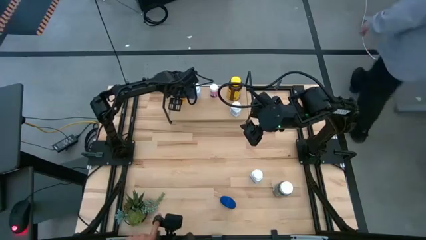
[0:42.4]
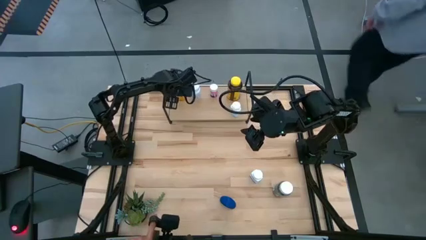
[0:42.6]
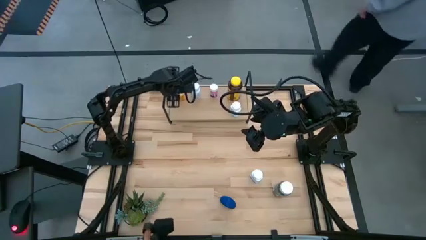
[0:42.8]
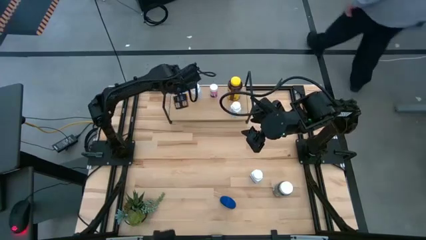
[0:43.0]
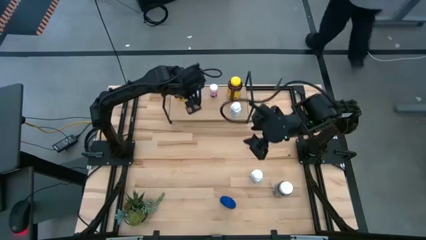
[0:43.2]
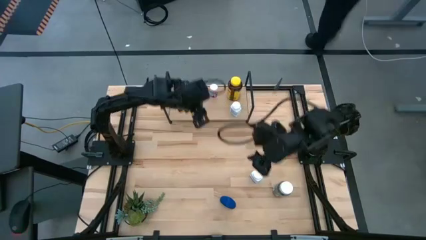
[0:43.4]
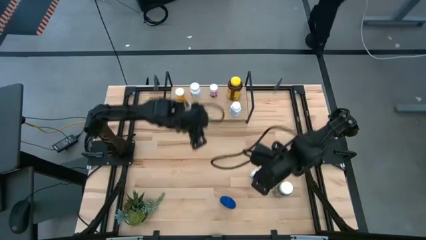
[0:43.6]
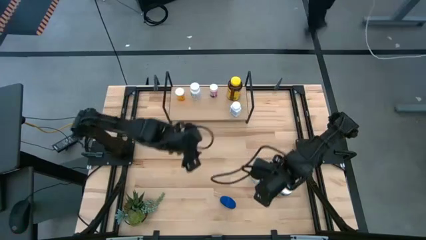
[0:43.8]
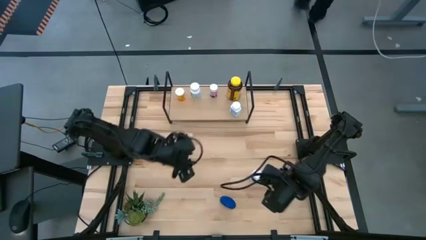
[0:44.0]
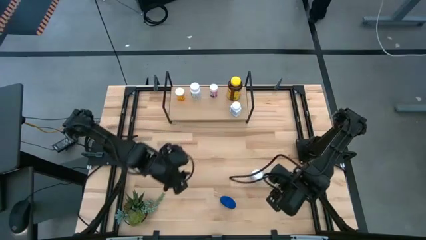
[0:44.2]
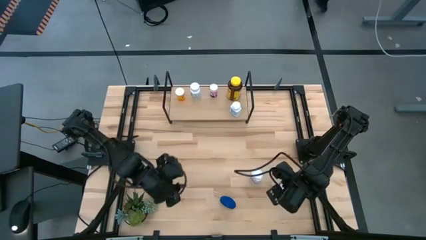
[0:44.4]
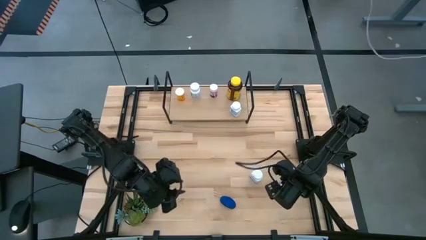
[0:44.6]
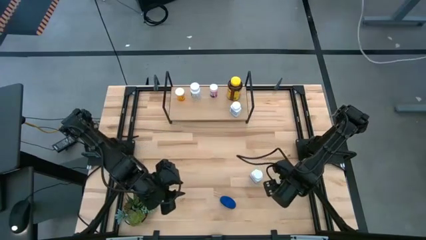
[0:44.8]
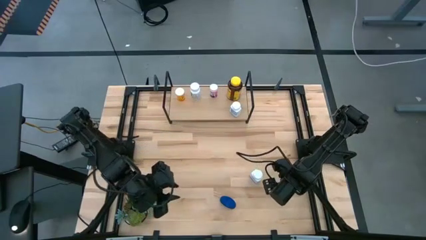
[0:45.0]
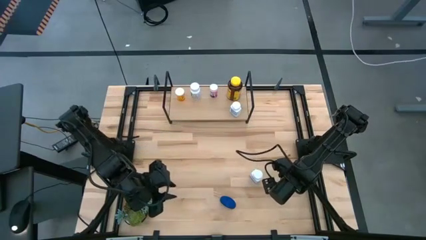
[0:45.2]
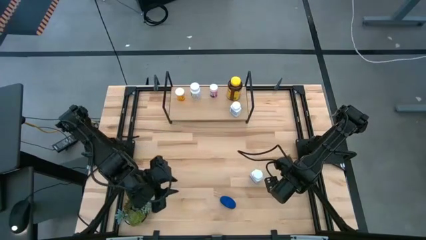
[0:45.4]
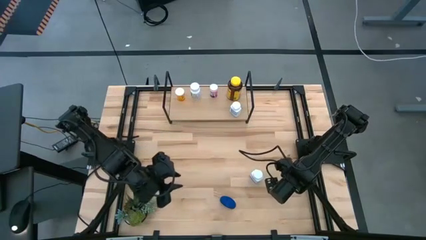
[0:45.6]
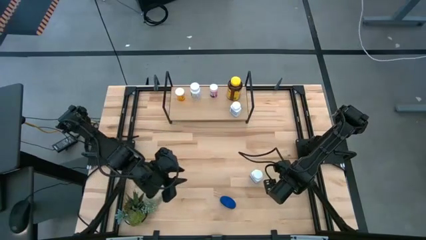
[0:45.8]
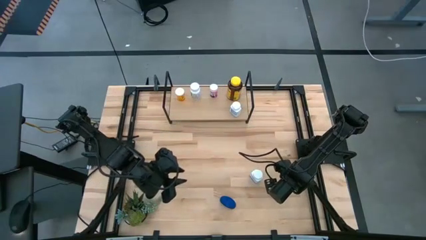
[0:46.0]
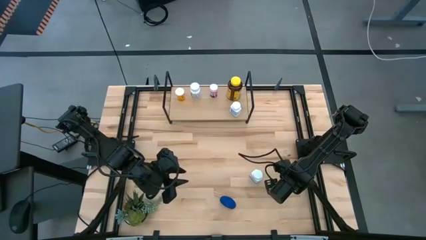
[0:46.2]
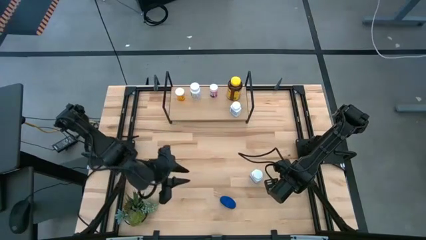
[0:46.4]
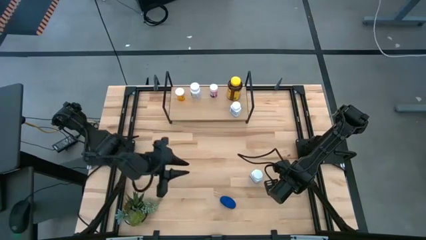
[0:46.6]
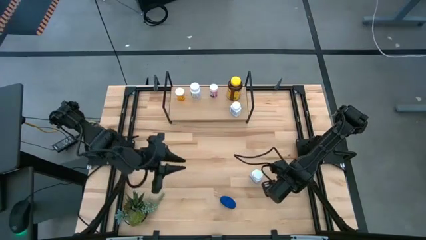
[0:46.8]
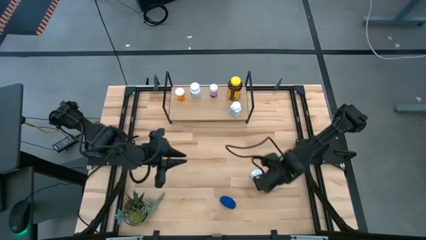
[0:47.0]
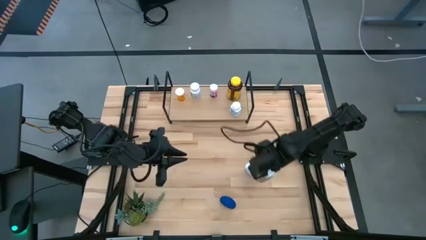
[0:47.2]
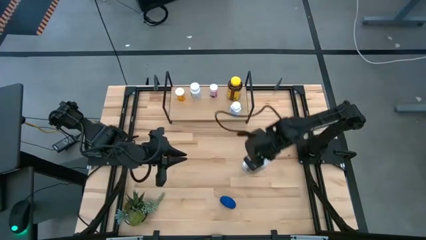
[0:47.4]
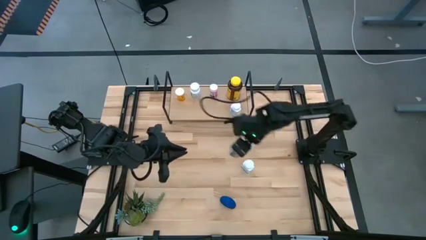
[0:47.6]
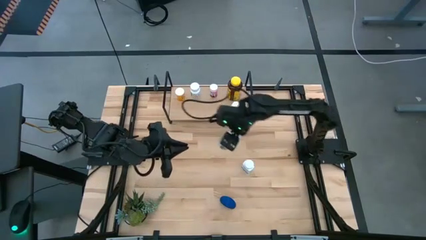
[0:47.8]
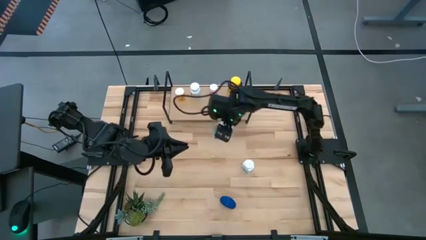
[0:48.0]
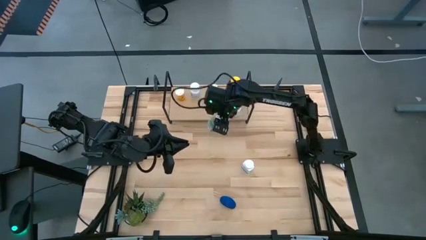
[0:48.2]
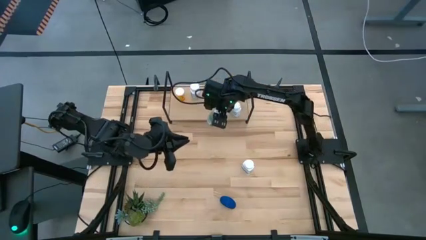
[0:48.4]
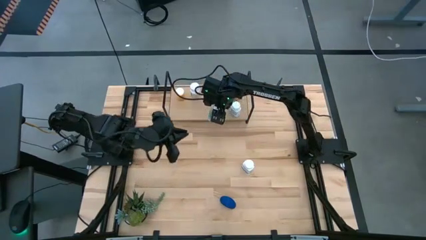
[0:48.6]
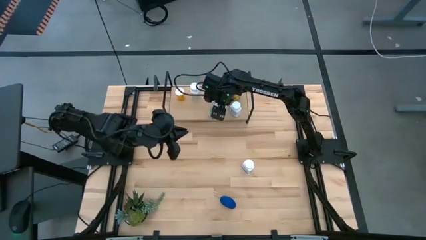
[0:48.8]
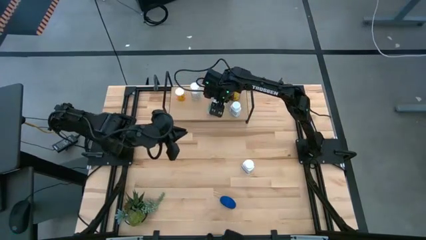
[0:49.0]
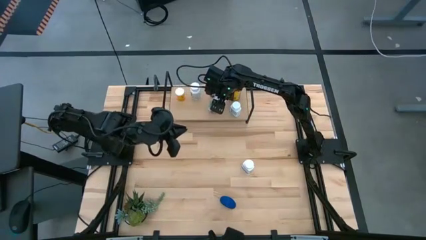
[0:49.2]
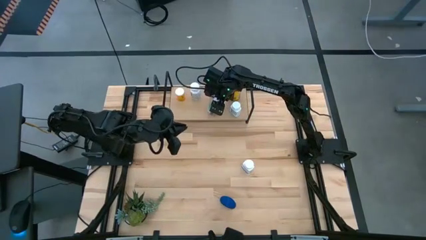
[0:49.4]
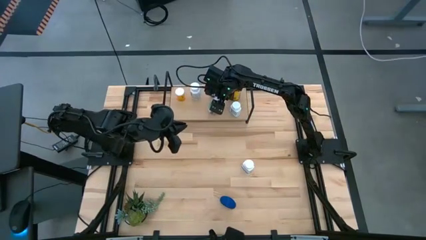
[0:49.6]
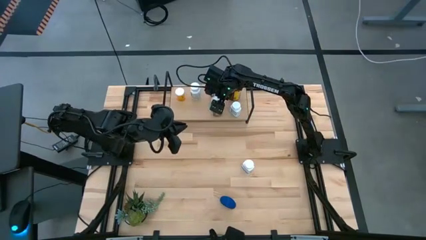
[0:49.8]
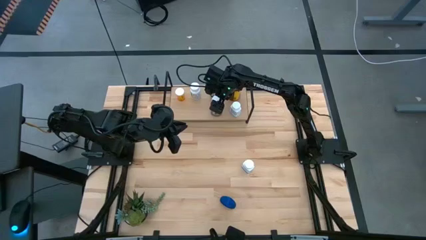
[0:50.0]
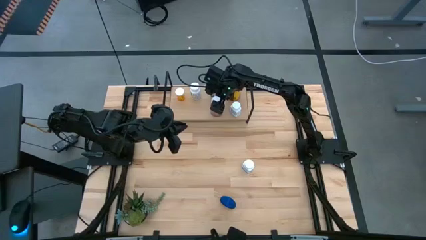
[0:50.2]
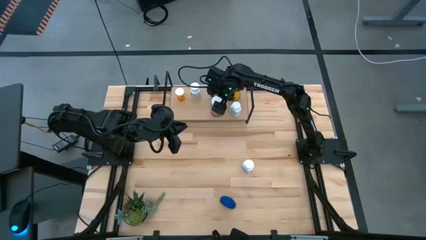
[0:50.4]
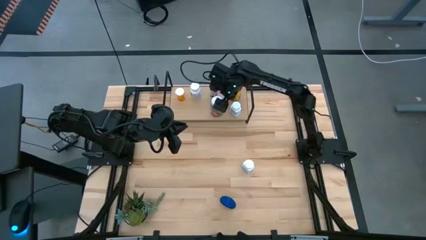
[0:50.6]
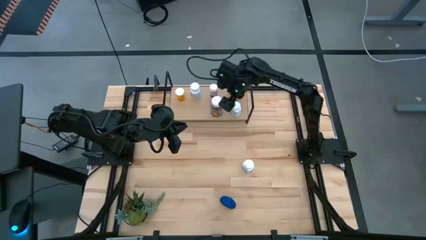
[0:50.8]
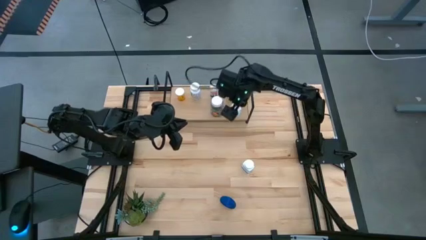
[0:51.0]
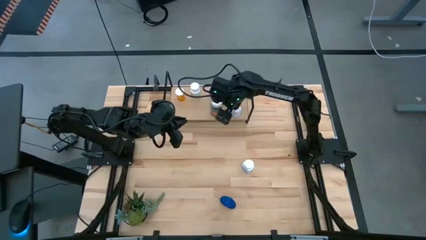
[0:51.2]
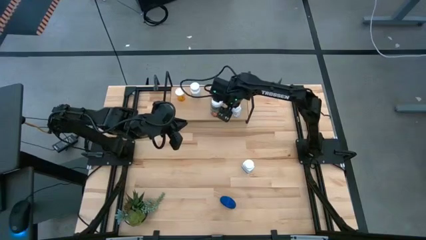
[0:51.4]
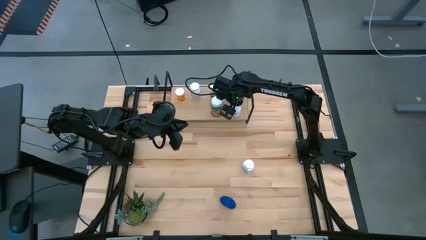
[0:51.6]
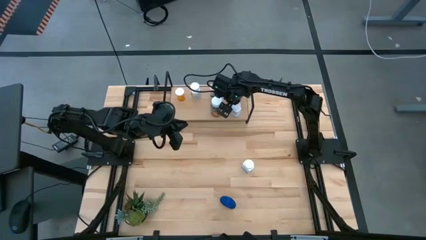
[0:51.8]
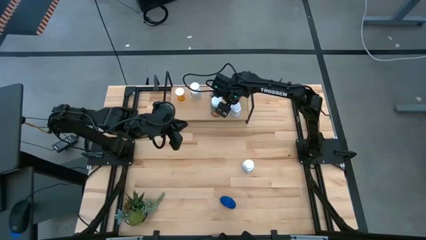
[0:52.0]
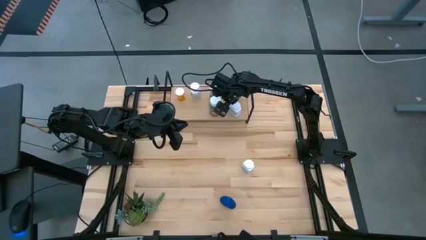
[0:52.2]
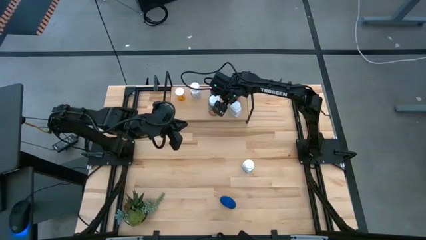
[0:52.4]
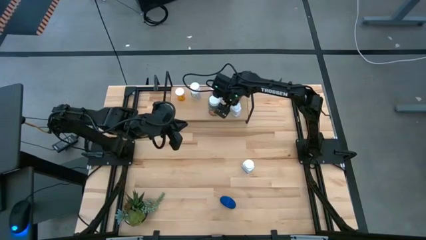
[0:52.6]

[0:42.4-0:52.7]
Task: Pick and place medicine bottles onto shelf by color
Put the green pill bottle on the shelf

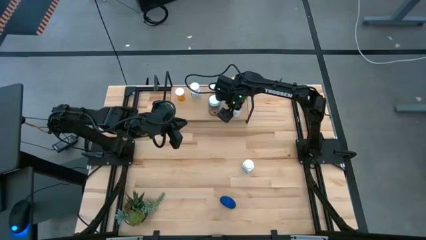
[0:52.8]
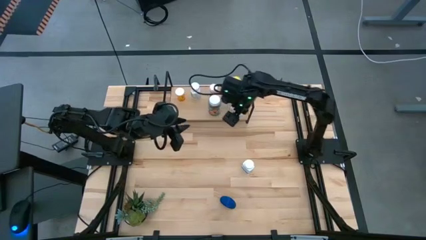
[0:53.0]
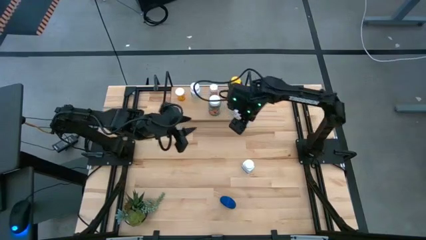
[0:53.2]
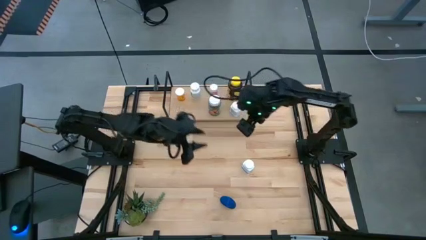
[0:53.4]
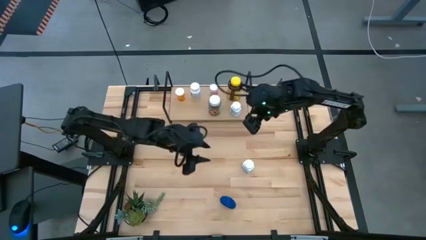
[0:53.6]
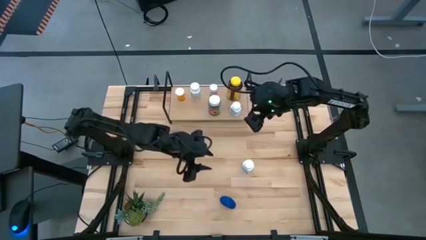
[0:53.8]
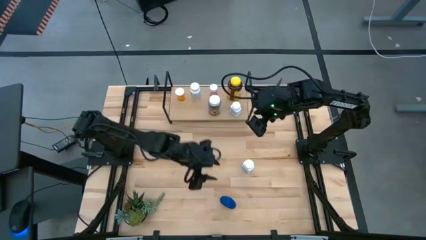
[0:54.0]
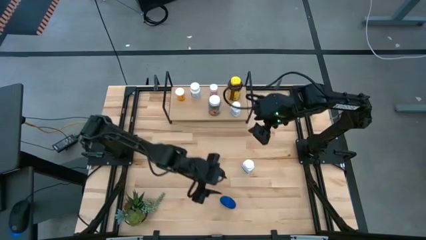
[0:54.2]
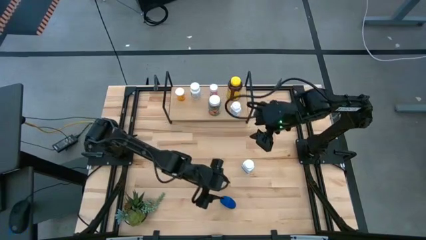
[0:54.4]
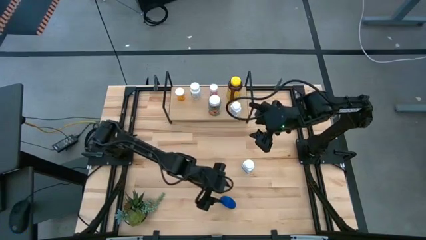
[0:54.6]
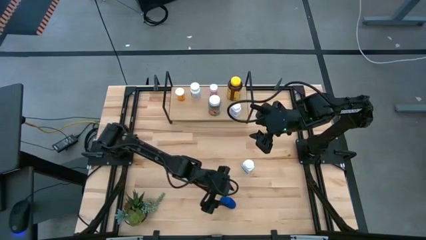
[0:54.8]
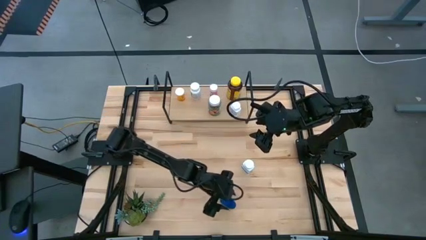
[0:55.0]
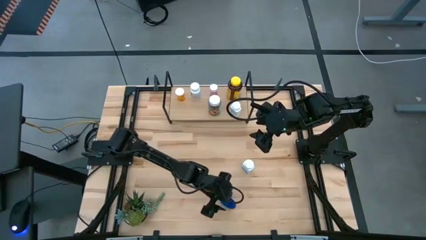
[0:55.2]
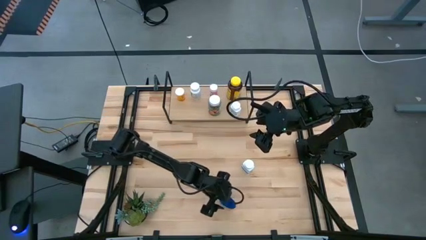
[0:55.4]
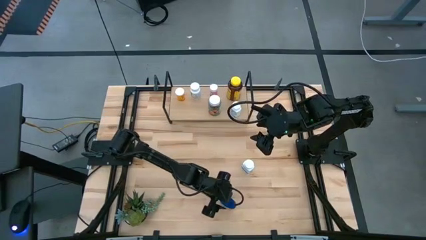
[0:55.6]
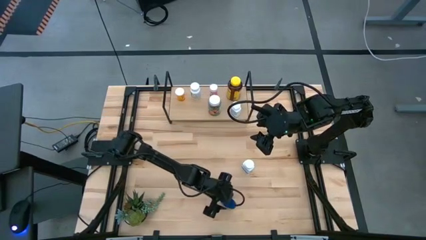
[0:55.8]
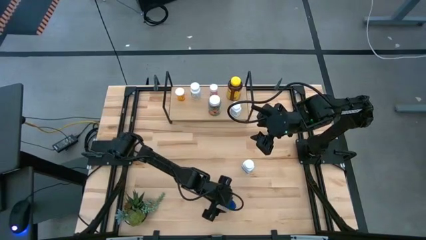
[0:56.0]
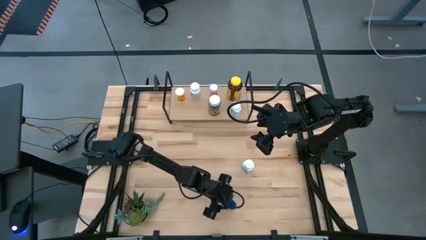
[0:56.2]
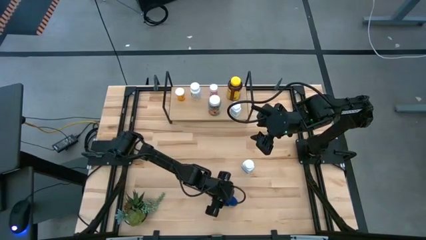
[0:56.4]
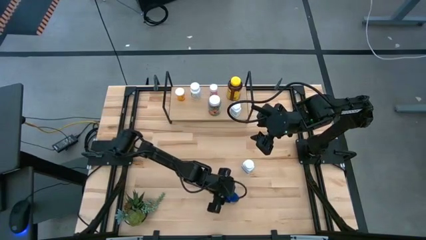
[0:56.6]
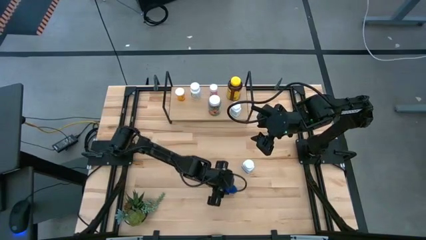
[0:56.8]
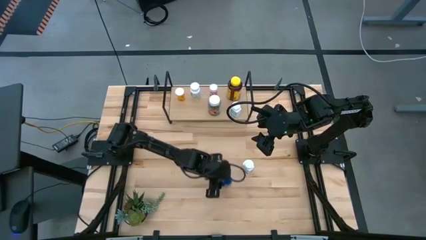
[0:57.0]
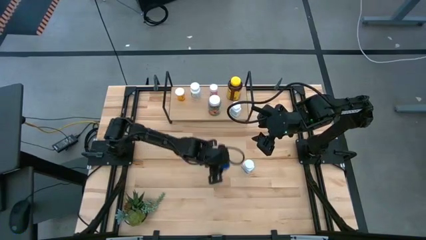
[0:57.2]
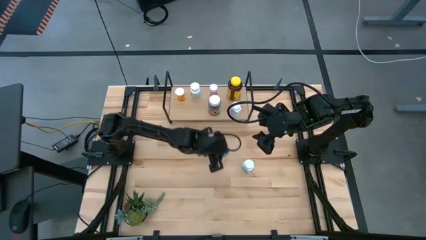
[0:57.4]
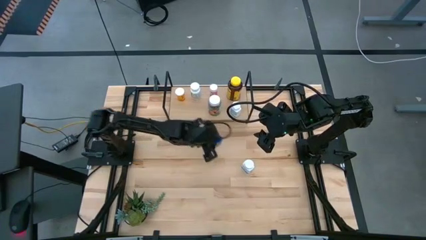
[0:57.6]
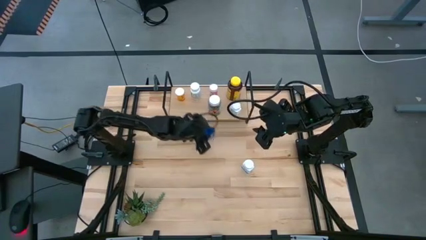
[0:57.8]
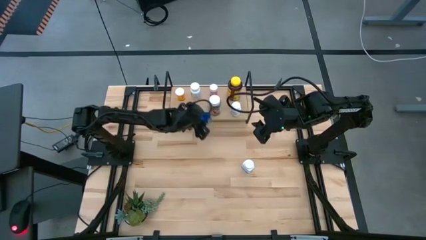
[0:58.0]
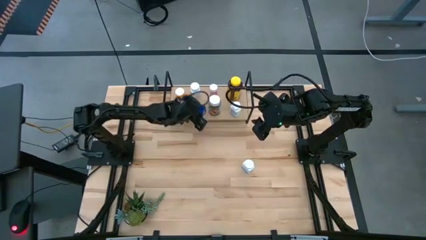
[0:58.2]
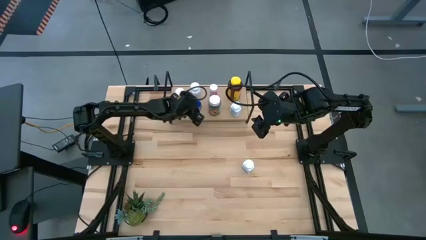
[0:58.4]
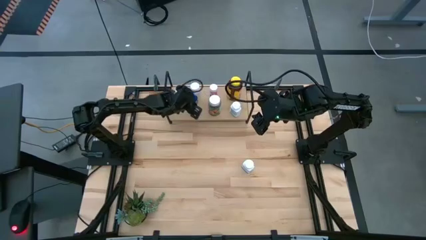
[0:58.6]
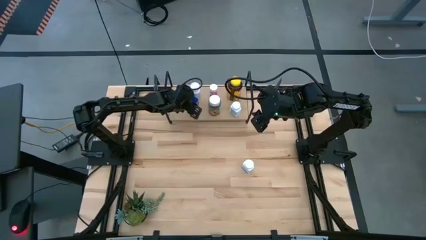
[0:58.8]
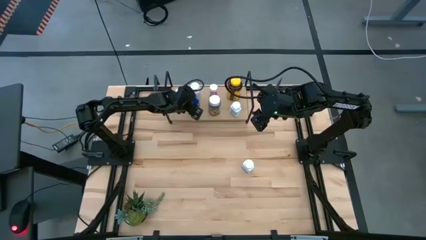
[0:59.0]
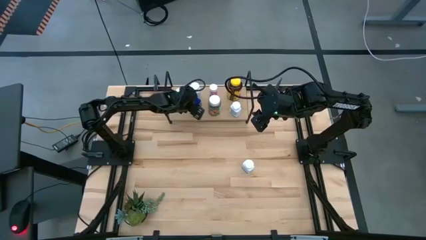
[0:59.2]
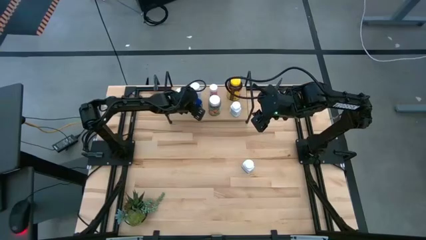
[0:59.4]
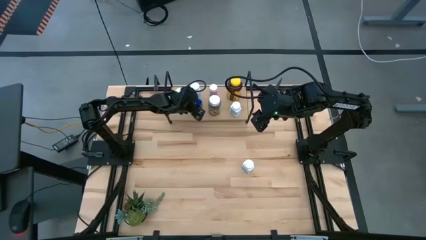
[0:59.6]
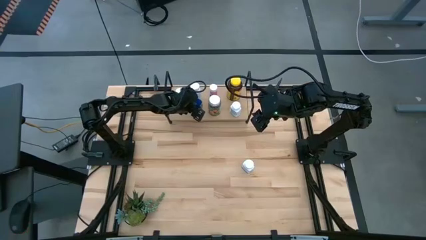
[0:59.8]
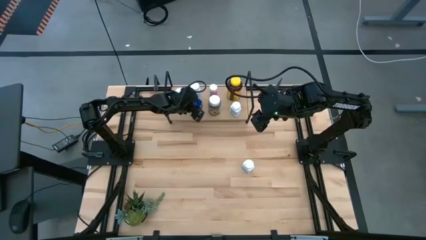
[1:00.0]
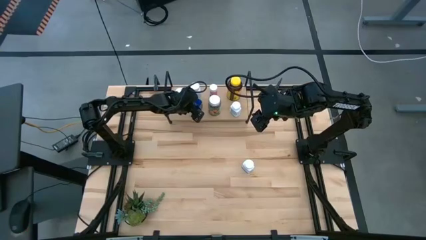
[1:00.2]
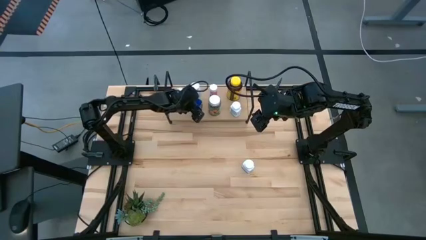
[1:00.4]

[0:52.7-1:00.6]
Put the blue pill bottle on the shelf
